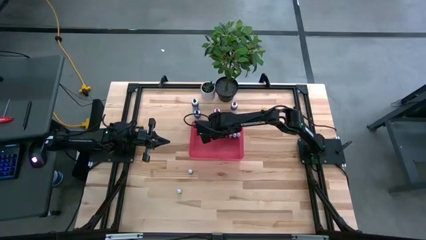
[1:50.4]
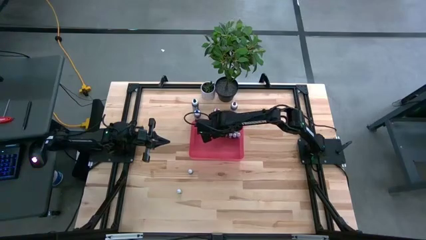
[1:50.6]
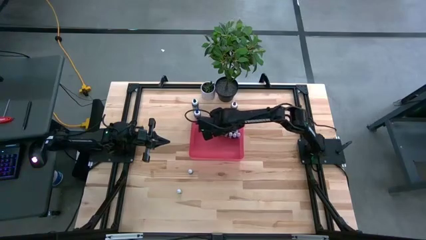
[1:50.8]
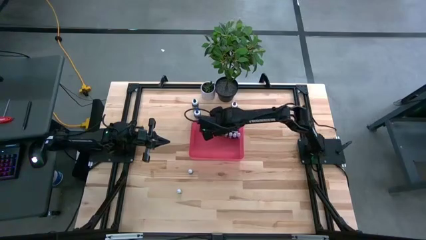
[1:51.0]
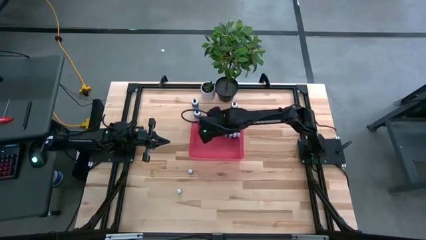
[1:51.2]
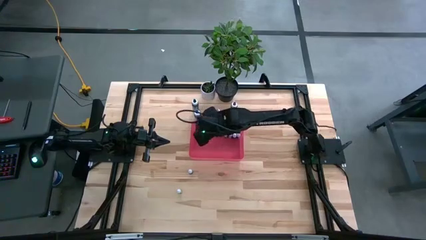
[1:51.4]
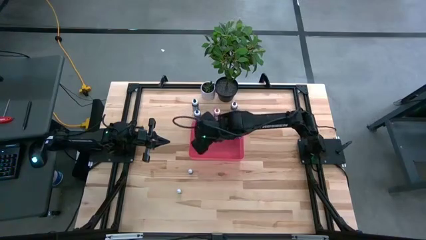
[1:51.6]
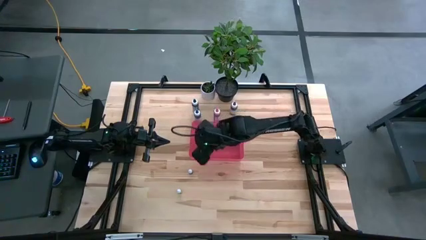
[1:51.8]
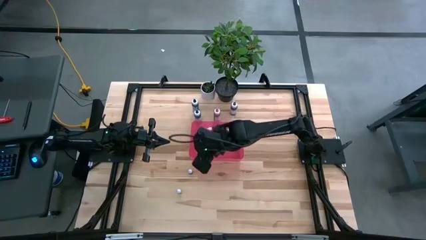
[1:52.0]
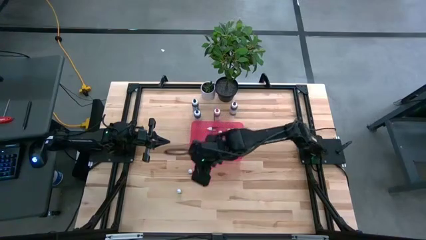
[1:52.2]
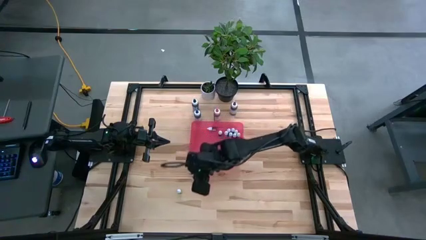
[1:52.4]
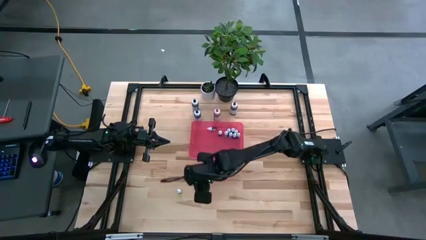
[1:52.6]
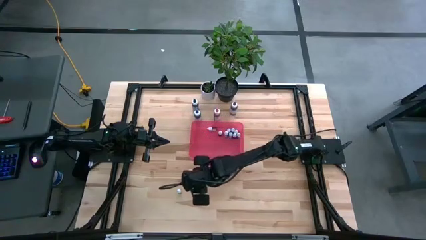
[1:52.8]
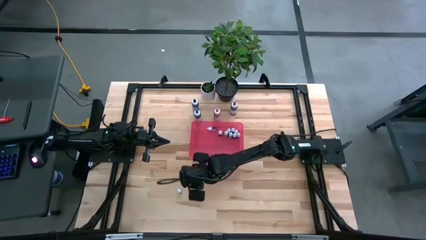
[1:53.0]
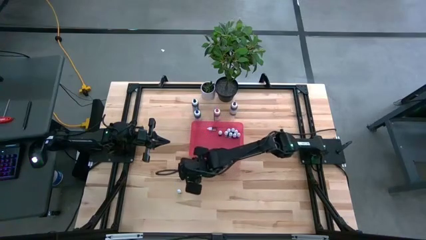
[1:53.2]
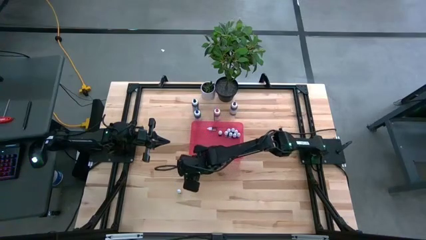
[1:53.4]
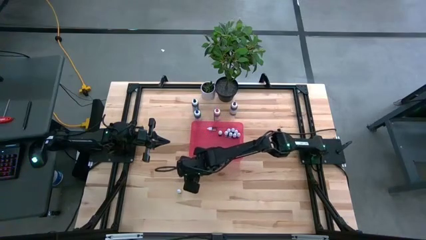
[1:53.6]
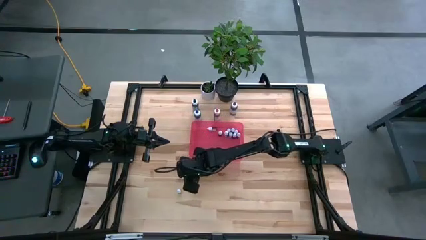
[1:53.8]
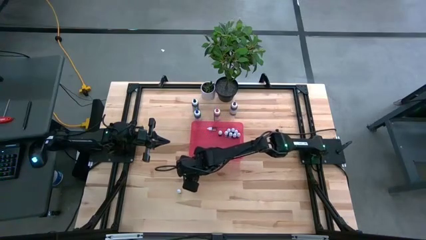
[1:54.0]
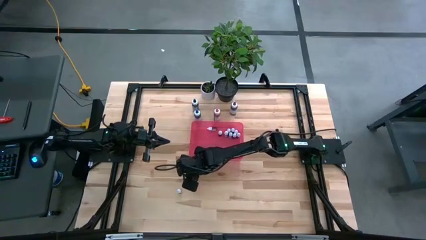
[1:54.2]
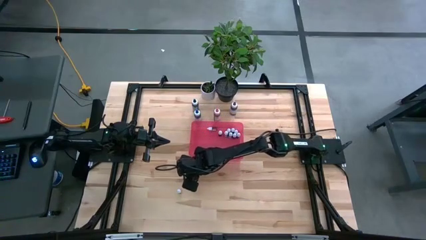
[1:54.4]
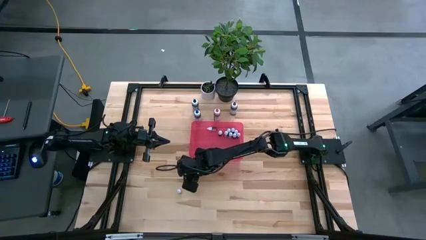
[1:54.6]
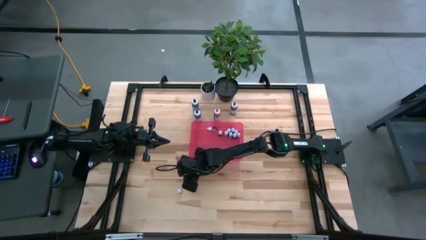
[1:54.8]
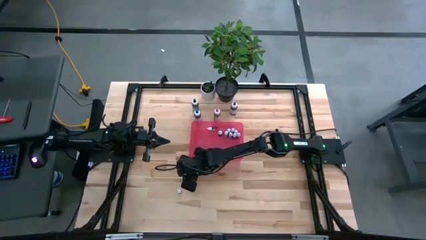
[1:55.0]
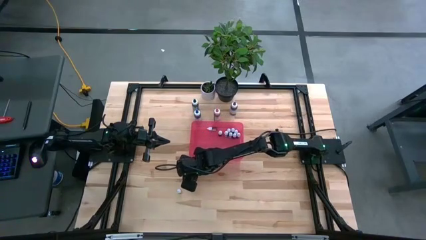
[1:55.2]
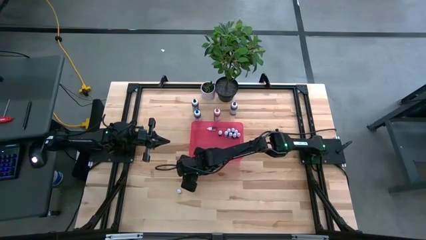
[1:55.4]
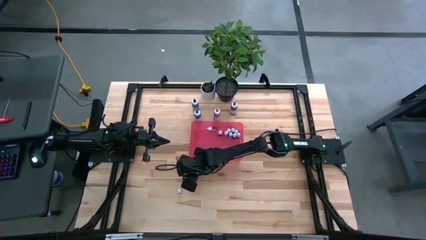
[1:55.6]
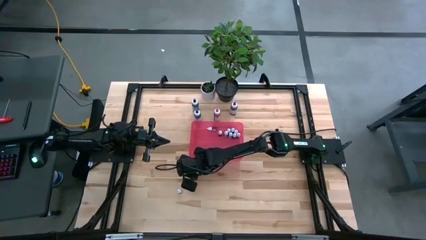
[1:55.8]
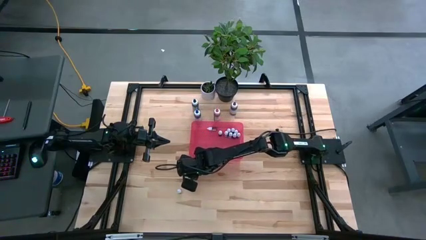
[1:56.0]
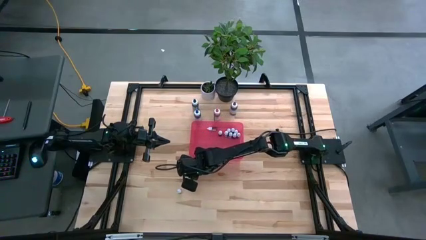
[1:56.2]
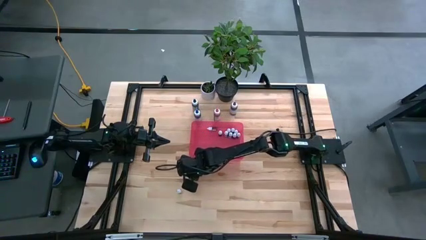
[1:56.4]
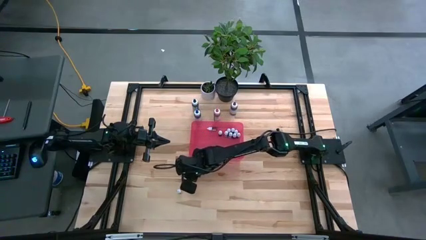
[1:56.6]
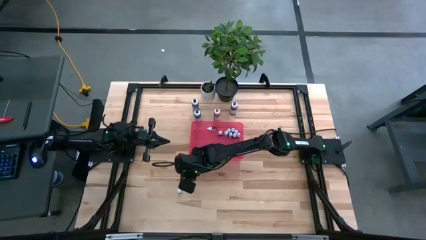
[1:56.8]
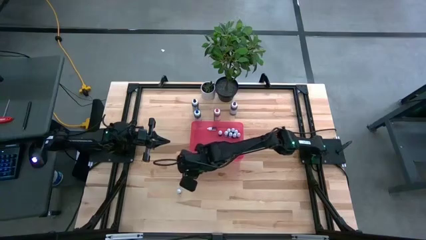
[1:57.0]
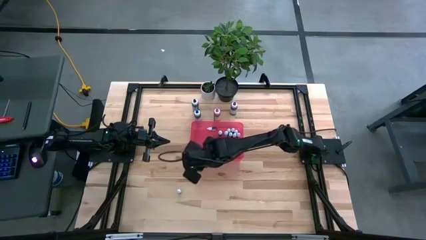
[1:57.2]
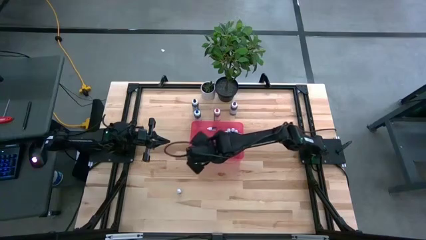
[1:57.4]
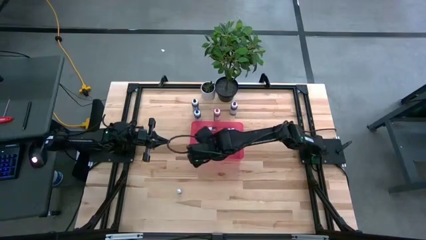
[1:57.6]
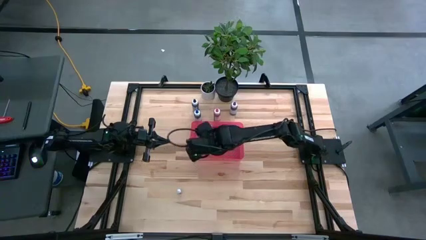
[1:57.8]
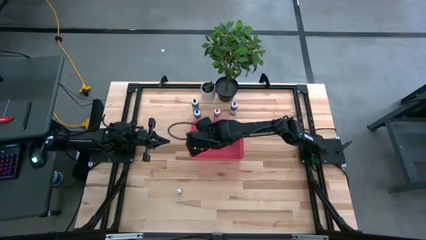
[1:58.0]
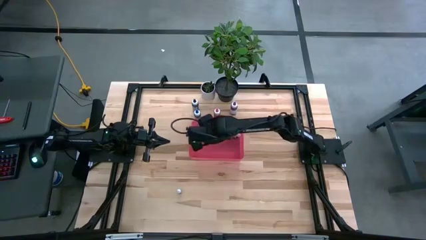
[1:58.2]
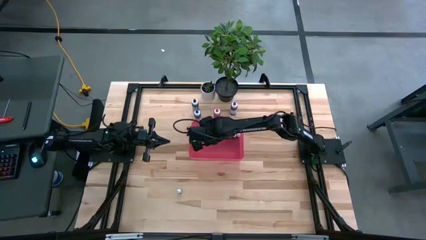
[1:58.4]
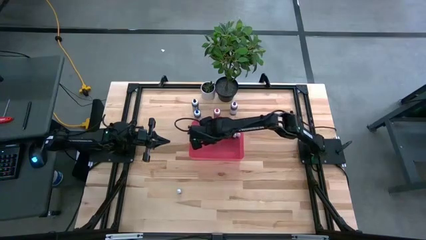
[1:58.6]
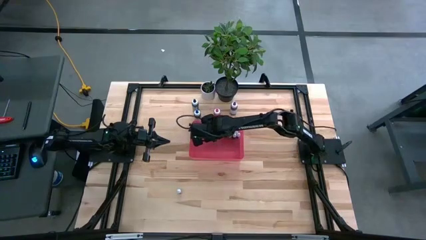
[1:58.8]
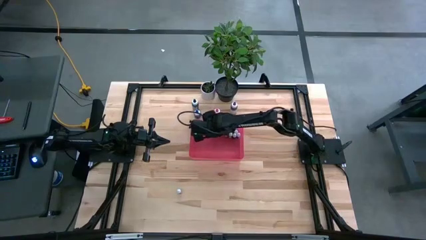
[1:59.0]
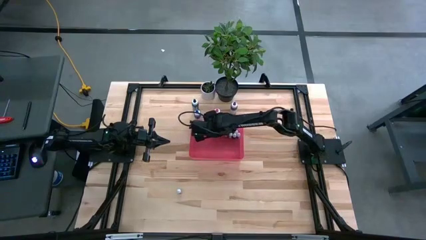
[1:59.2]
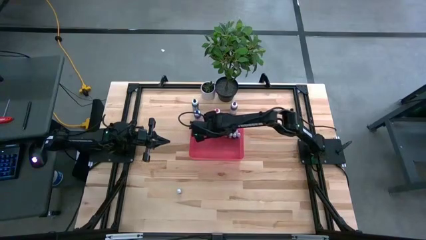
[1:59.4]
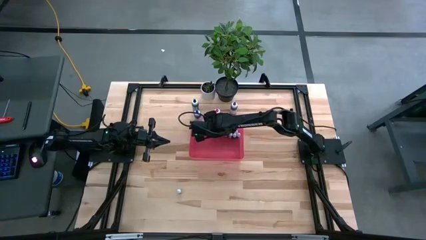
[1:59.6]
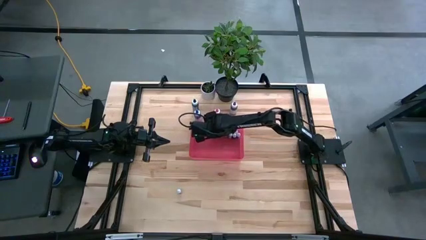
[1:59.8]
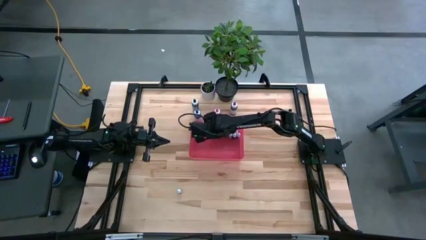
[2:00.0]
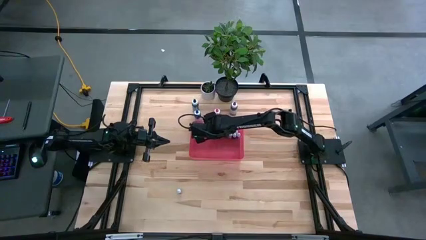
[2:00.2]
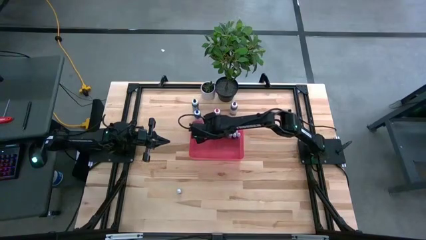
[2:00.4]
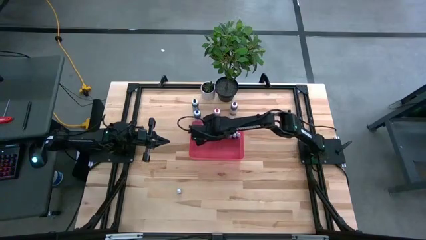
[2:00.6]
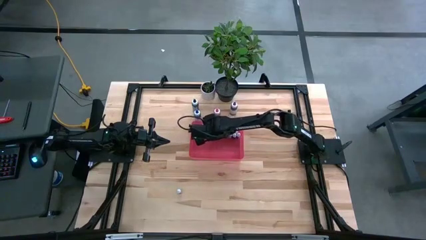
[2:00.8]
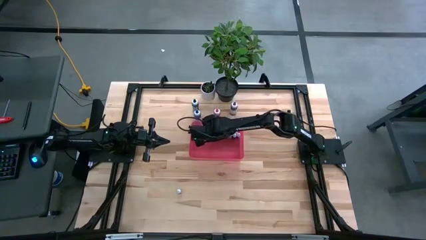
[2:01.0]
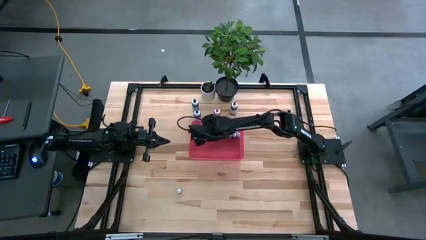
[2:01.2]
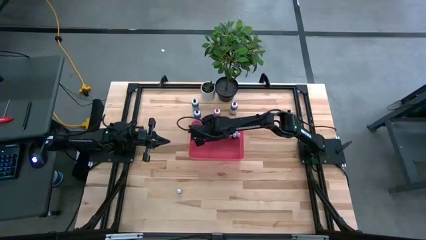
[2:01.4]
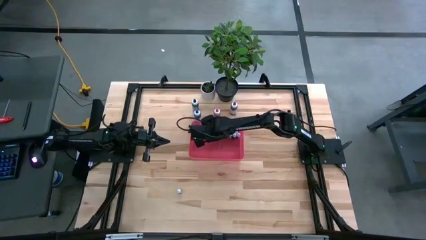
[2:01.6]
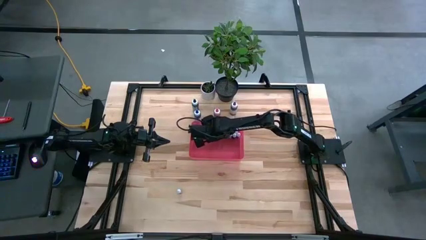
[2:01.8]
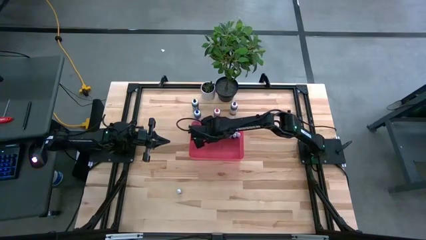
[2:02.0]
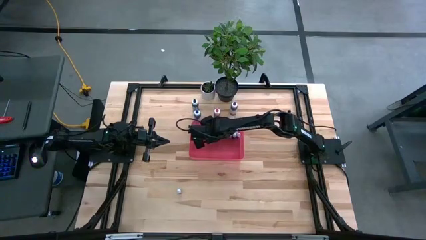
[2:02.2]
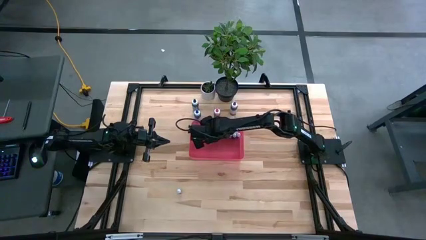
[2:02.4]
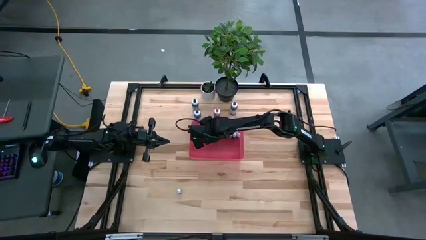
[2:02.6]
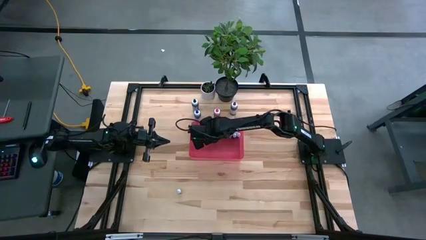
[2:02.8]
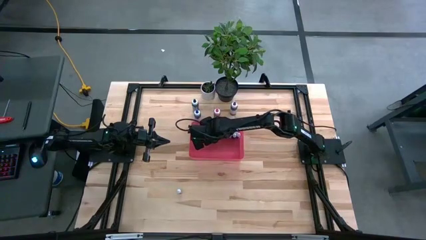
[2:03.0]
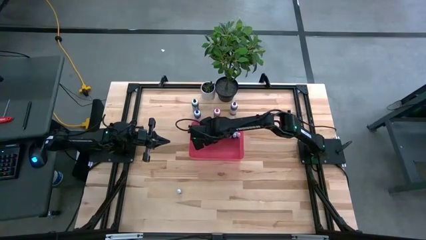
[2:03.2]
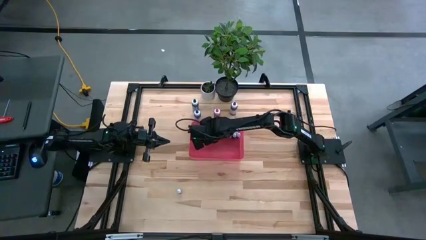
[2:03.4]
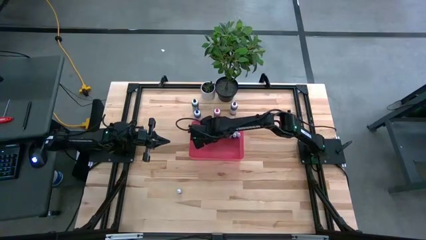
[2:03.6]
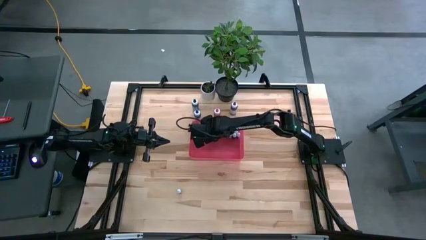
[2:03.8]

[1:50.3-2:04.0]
Task: Pick & Place food coloring
Put the small green food coloring bottle into the pink container
